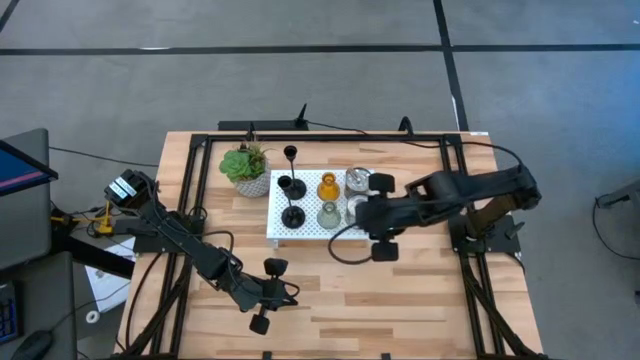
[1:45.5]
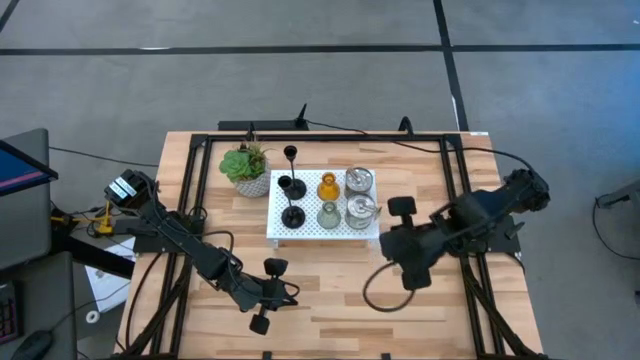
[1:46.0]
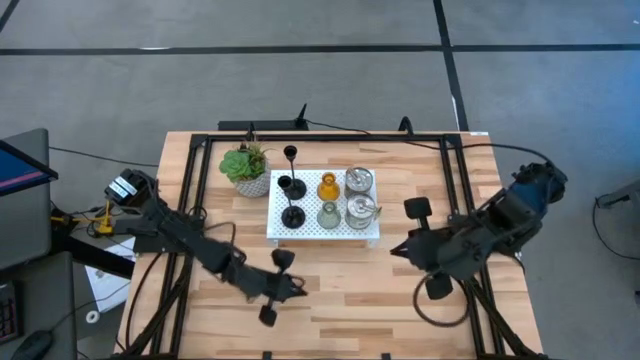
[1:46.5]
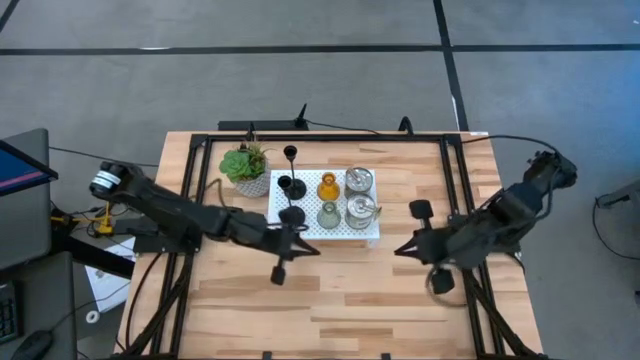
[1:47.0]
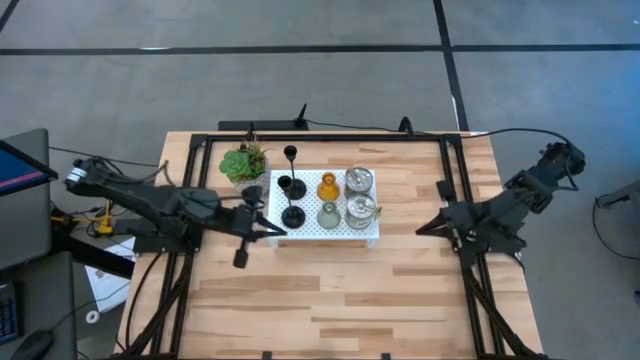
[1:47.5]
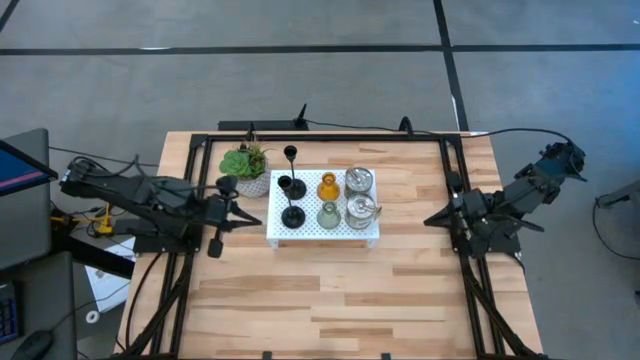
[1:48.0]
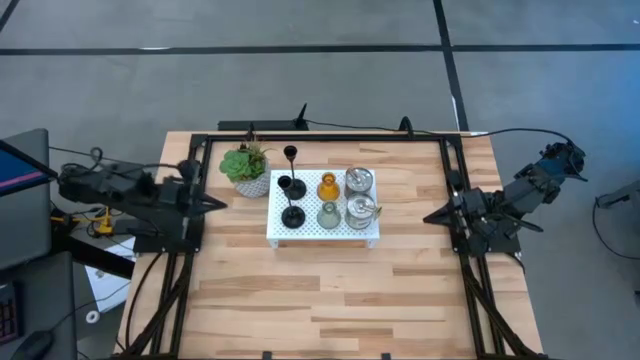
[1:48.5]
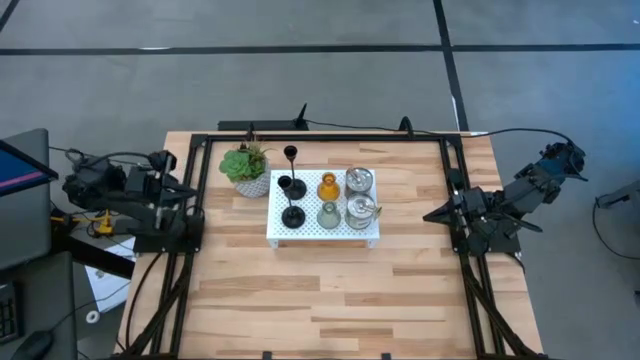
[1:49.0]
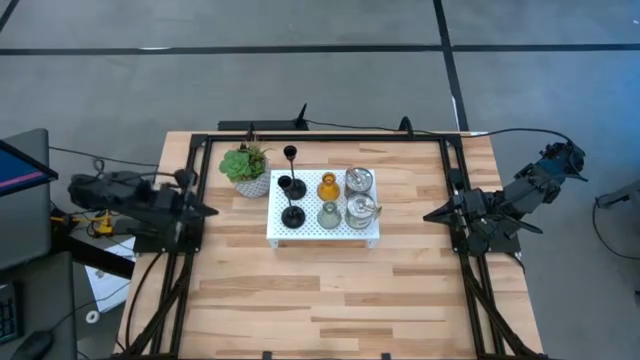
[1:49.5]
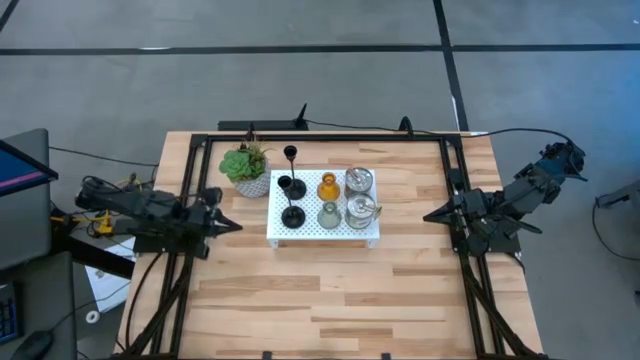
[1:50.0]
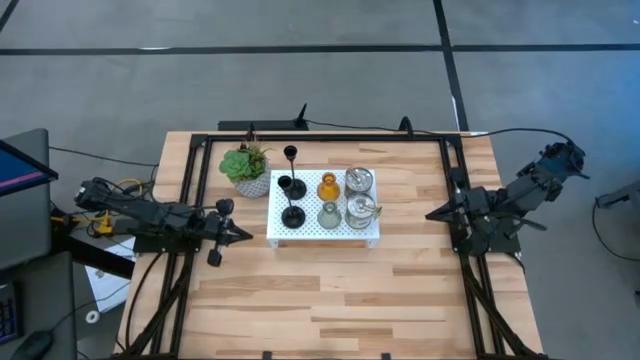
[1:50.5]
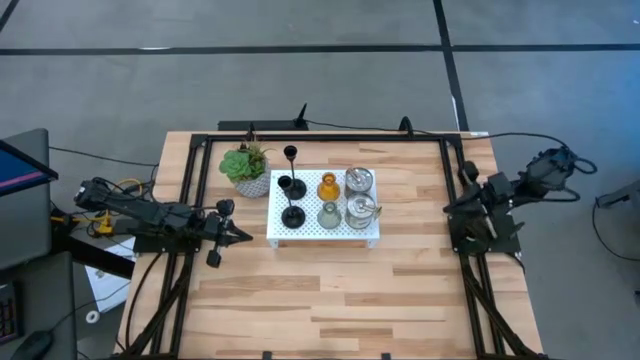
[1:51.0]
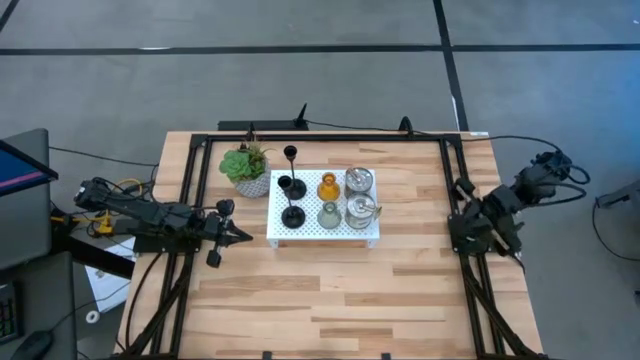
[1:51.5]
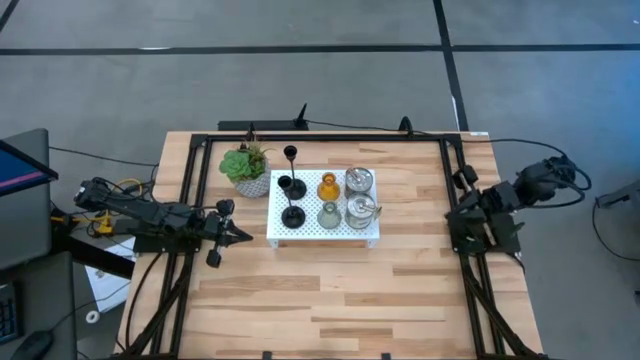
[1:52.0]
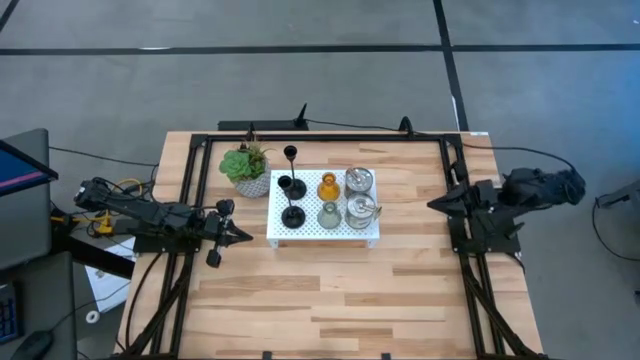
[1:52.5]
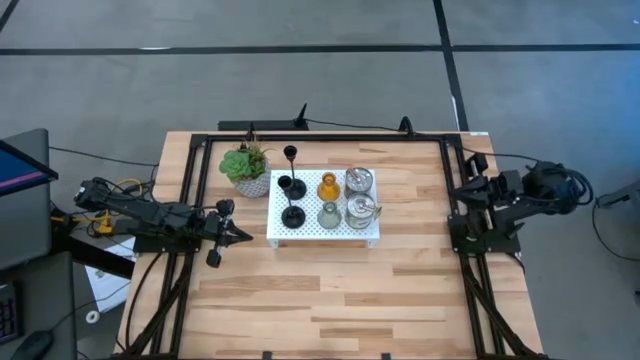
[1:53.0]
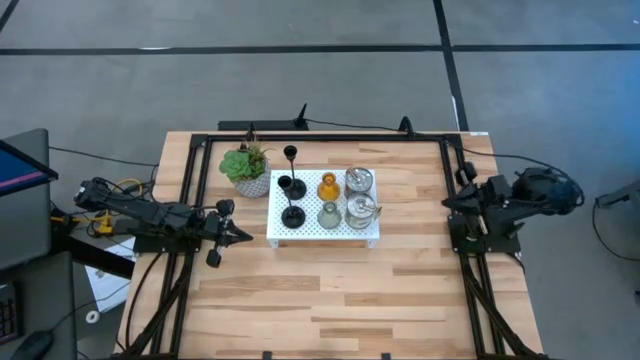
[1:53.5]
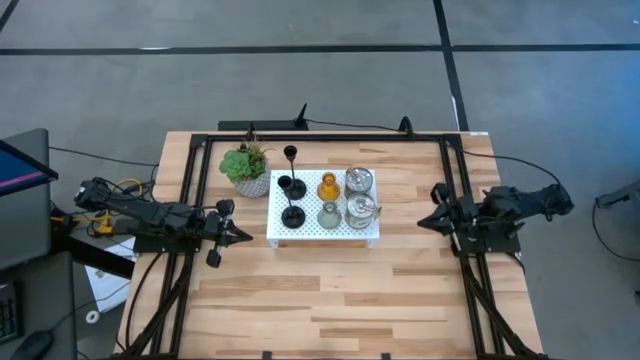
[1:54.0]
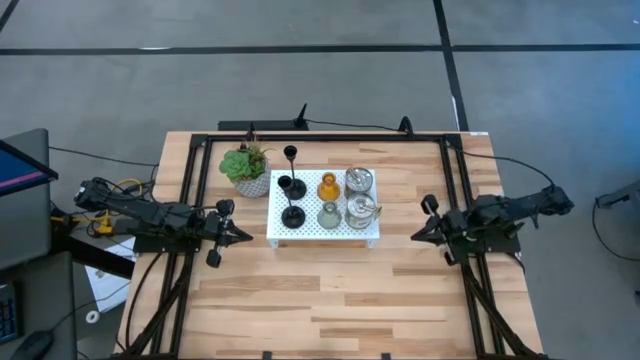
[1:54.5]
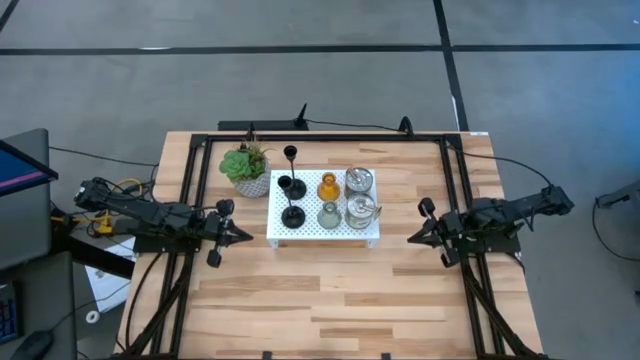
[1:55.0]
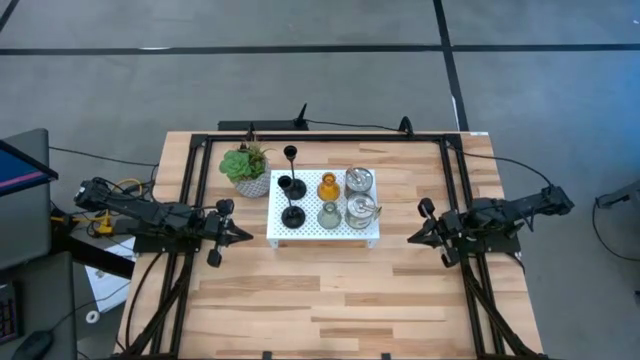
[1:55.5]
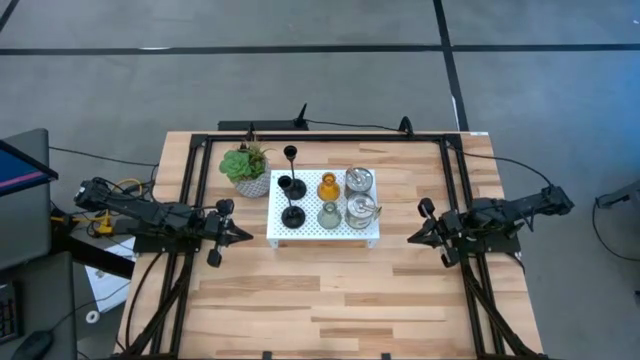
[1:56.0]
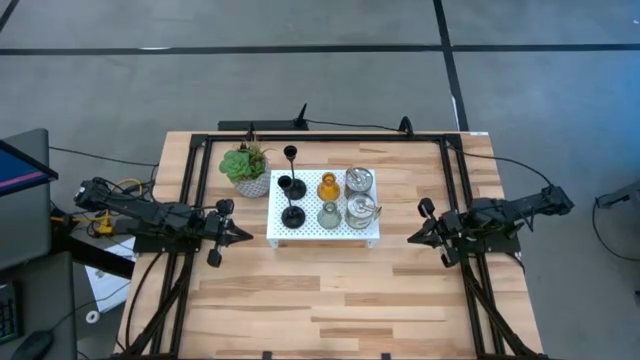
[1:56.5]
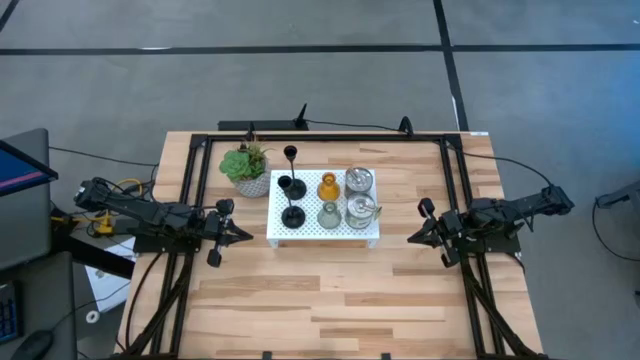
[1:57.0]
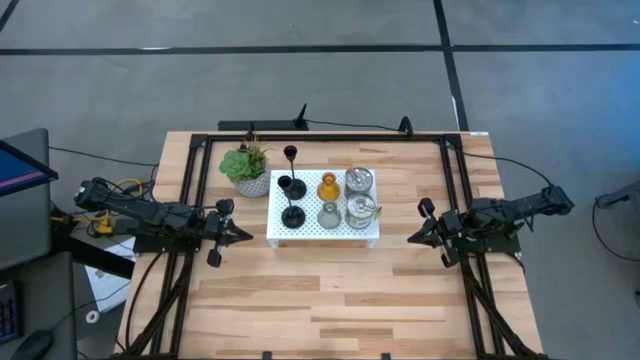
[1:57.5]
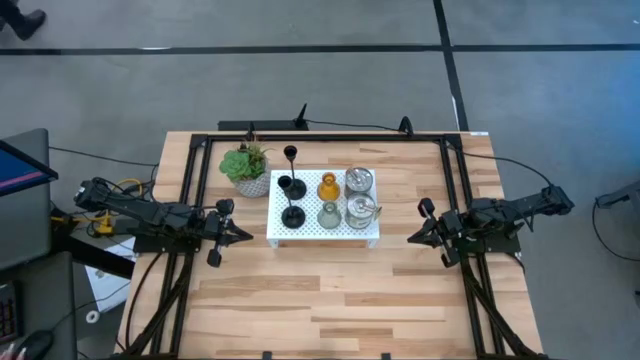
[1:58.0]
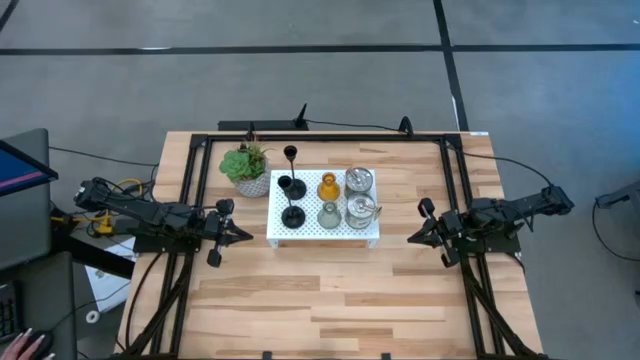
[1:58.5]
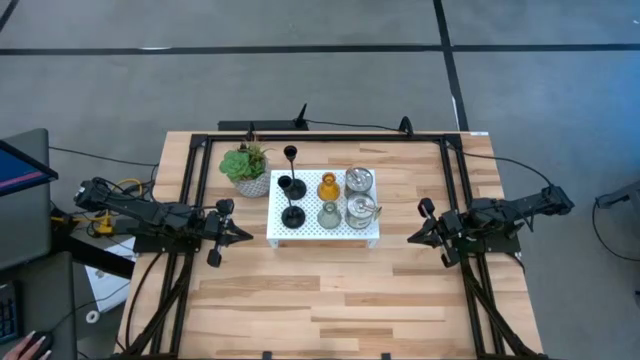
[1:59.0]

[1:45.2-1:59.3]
Task: Pick & Place candle stick holders
Return to Home Position
